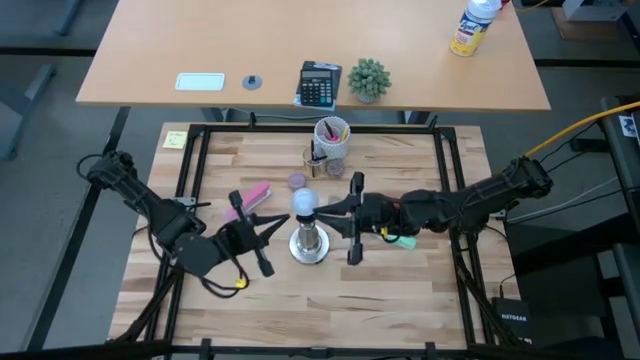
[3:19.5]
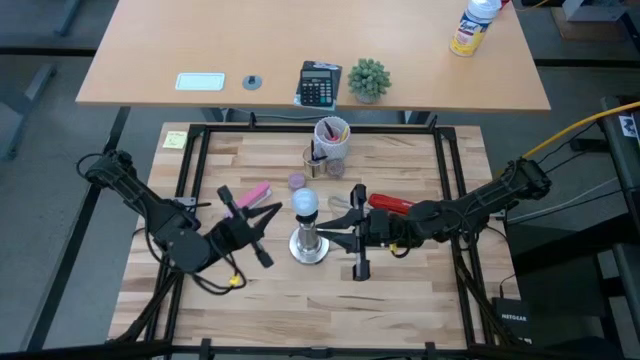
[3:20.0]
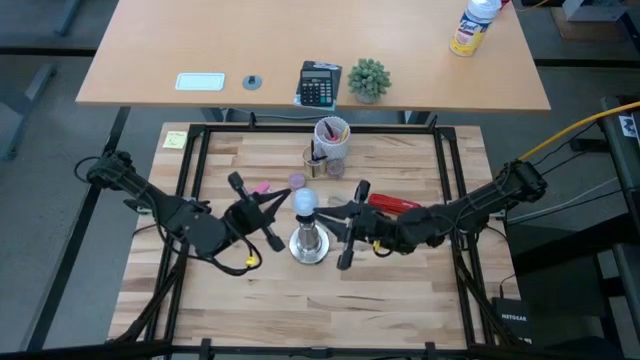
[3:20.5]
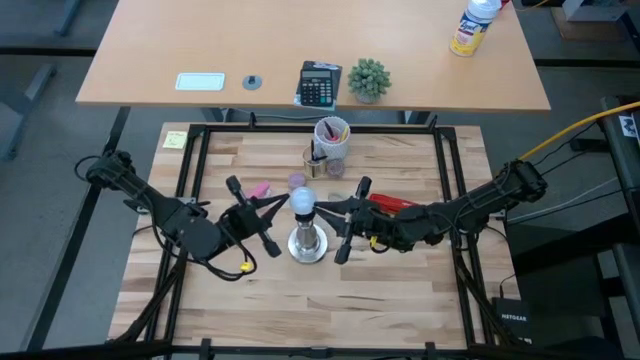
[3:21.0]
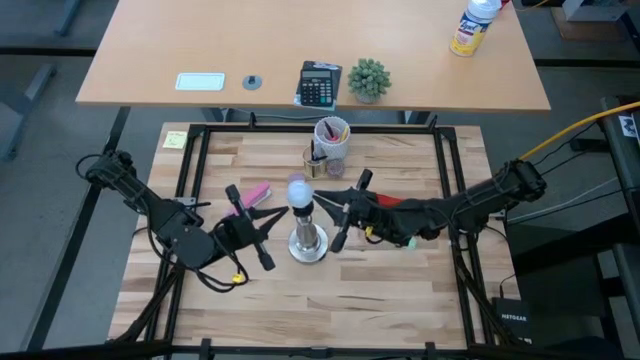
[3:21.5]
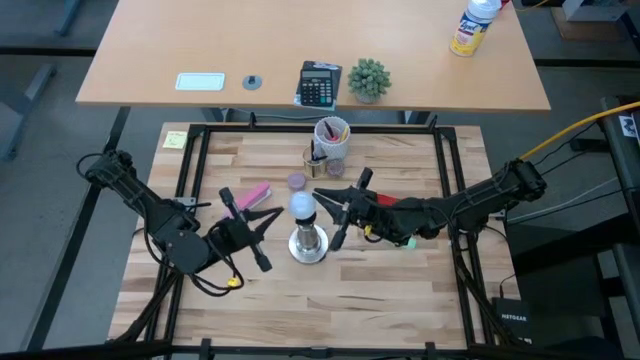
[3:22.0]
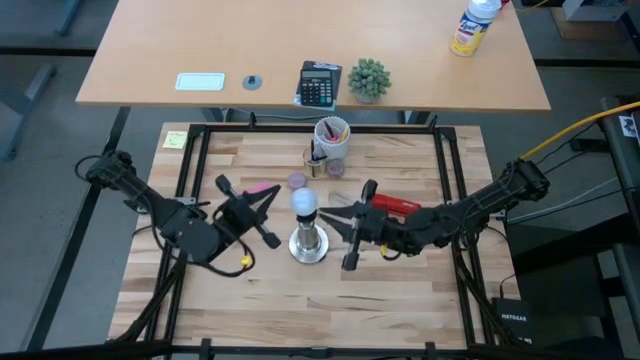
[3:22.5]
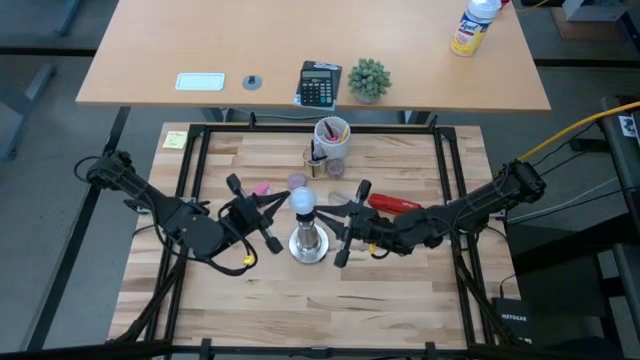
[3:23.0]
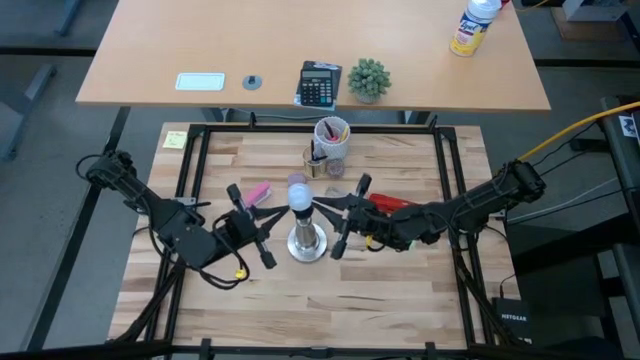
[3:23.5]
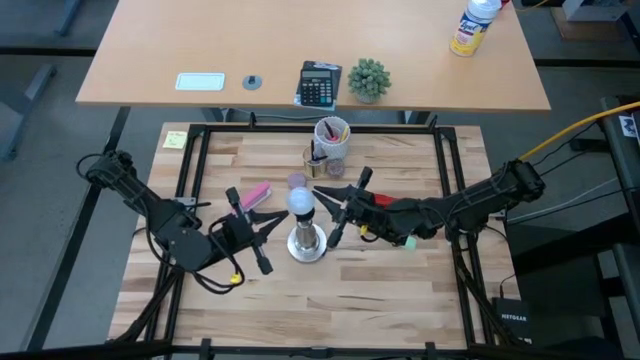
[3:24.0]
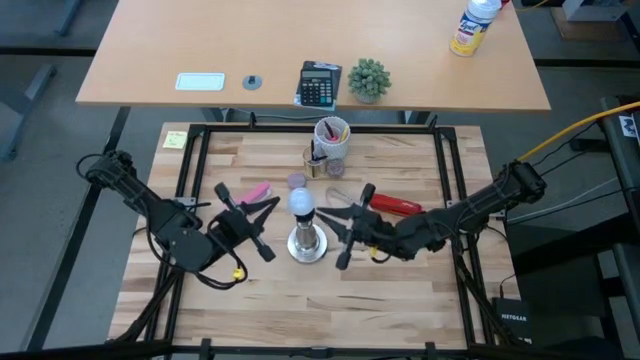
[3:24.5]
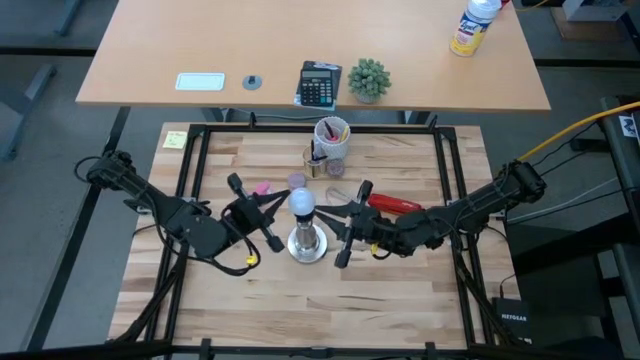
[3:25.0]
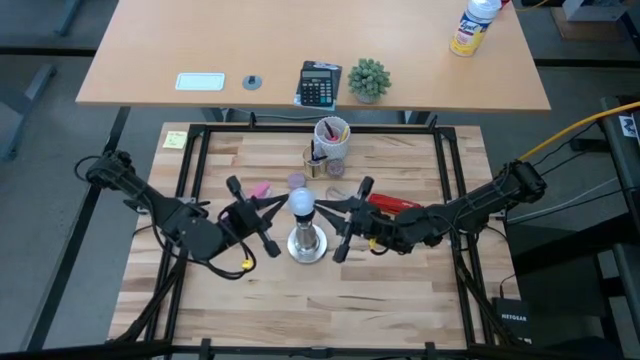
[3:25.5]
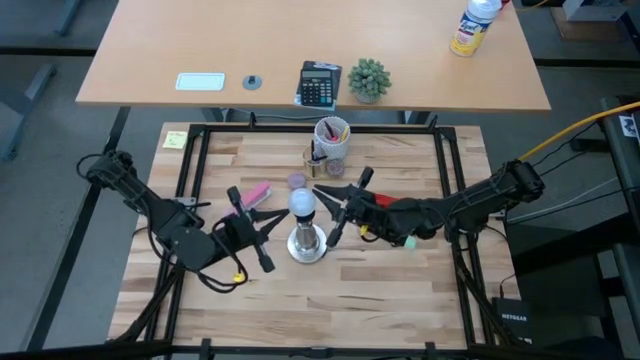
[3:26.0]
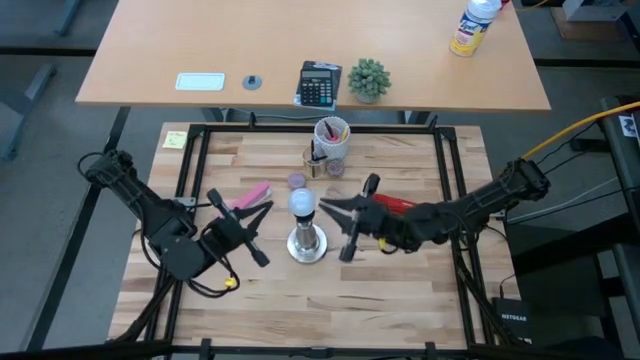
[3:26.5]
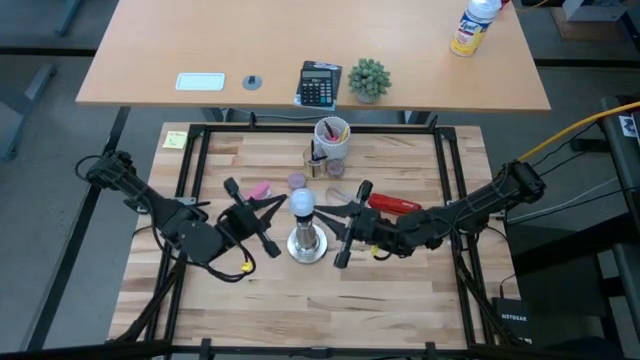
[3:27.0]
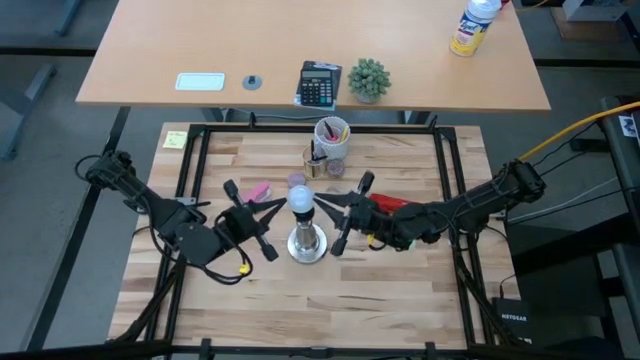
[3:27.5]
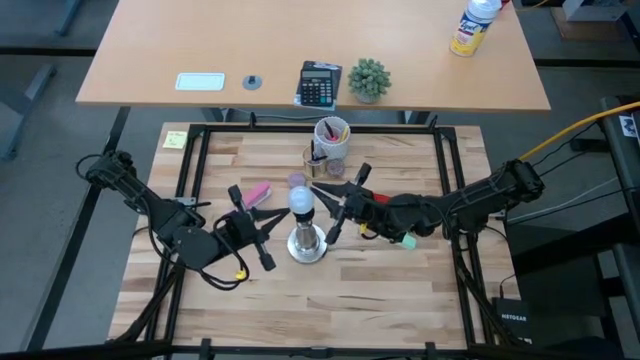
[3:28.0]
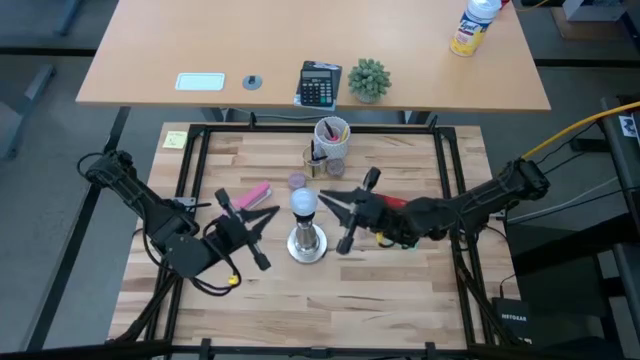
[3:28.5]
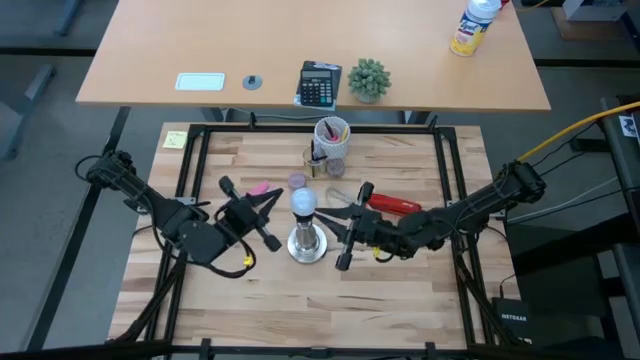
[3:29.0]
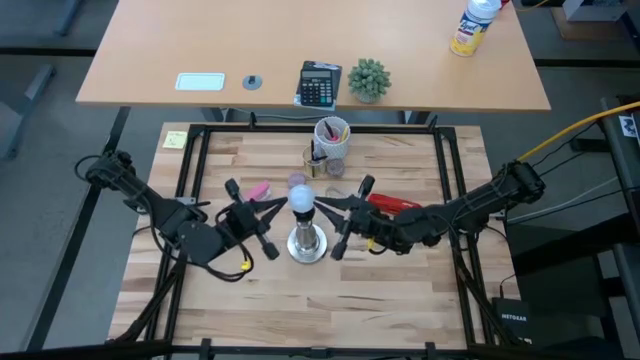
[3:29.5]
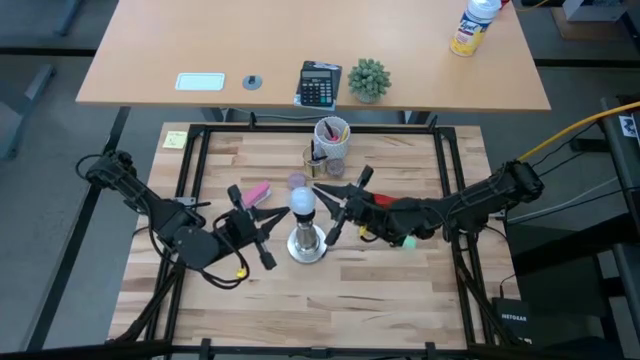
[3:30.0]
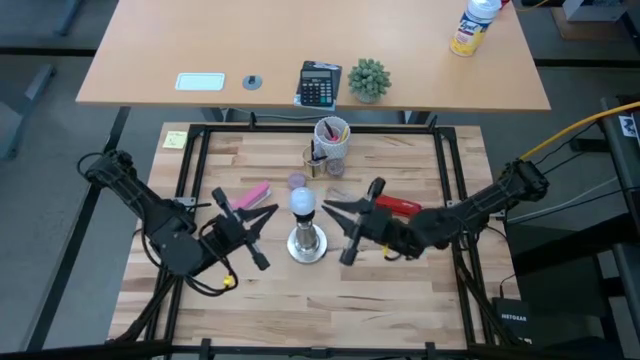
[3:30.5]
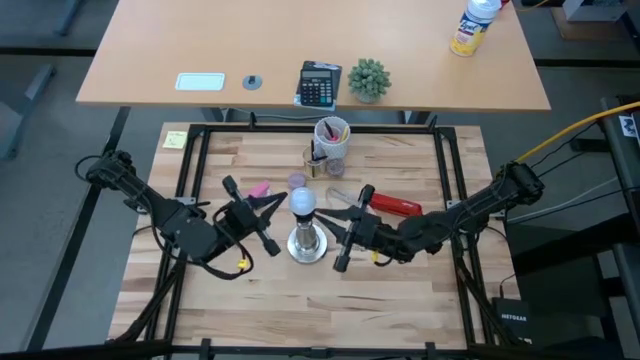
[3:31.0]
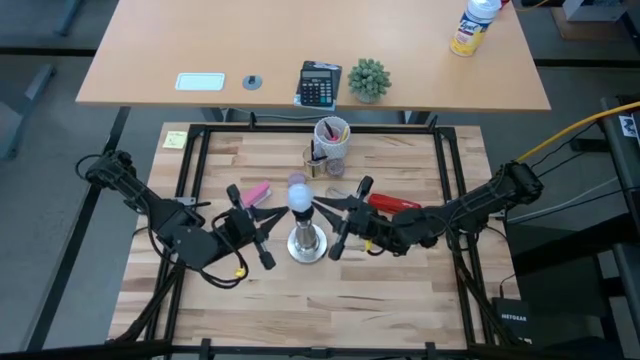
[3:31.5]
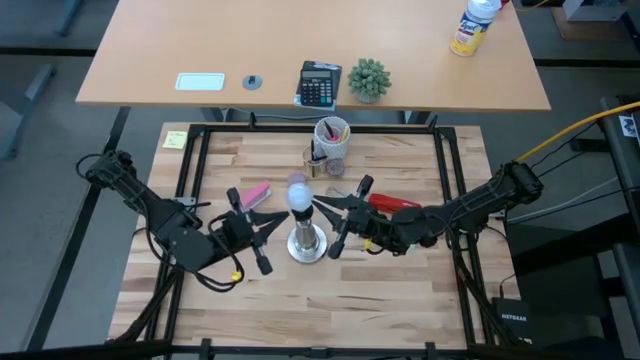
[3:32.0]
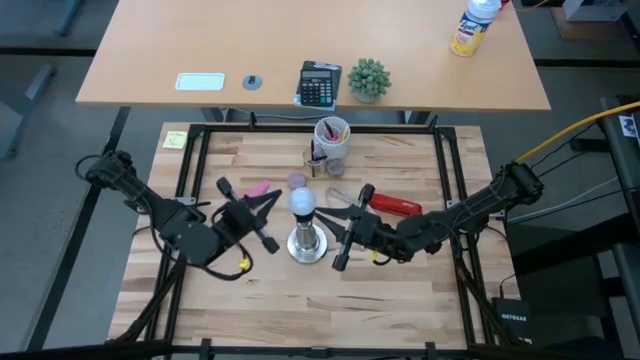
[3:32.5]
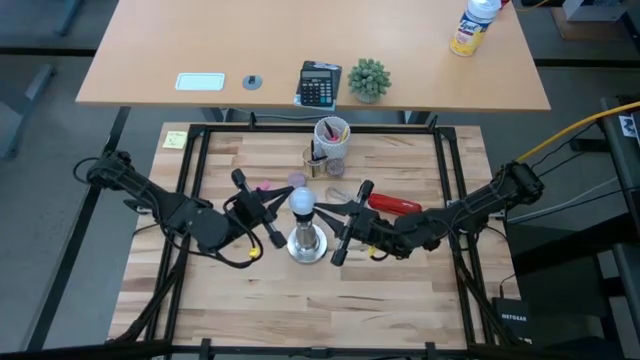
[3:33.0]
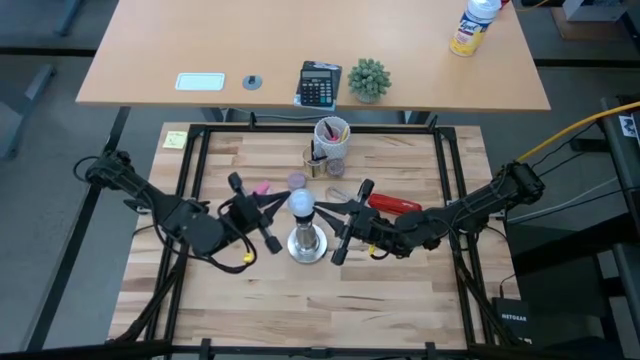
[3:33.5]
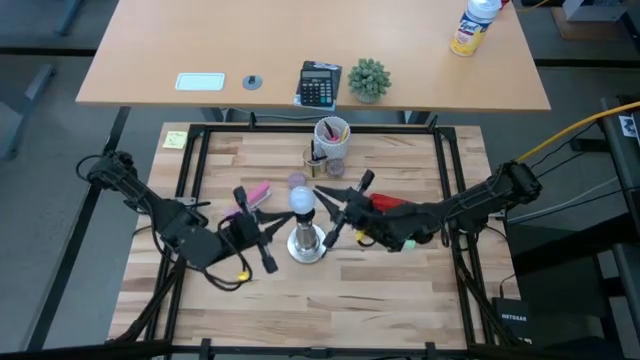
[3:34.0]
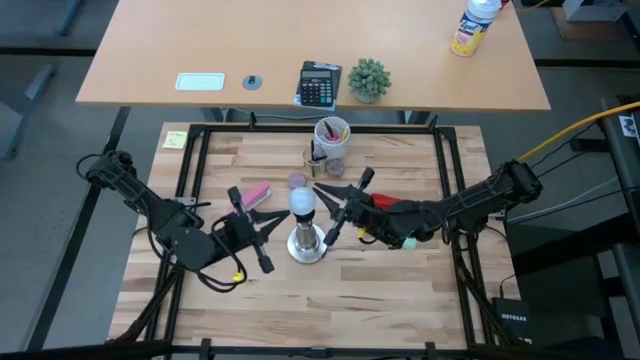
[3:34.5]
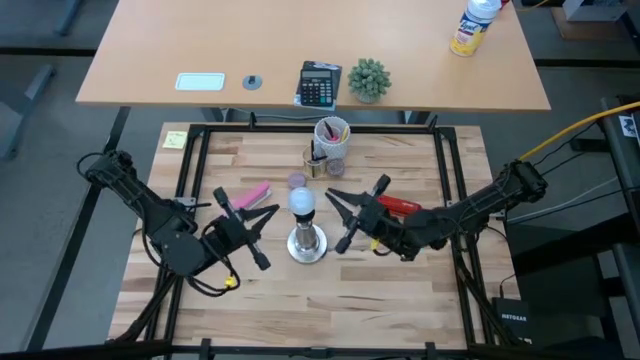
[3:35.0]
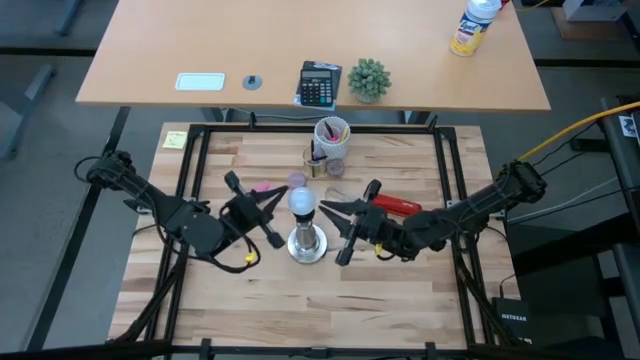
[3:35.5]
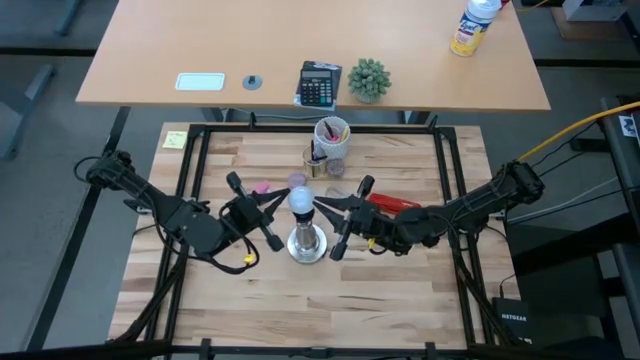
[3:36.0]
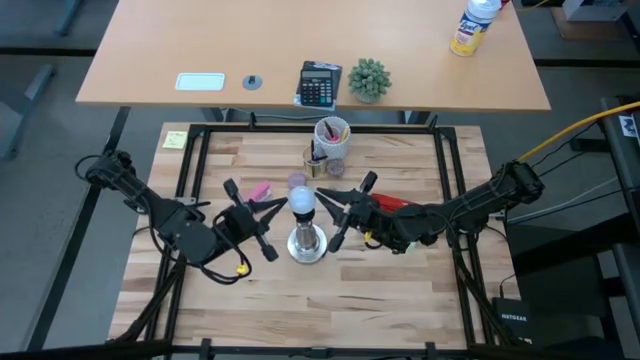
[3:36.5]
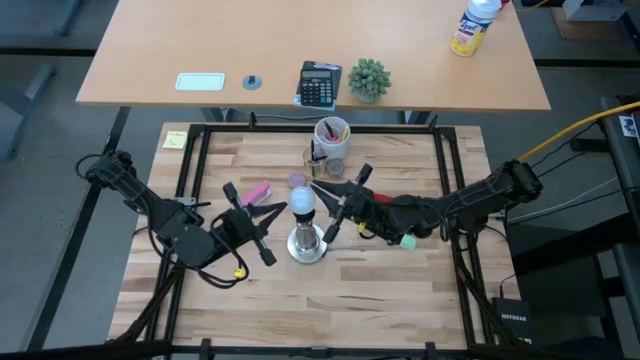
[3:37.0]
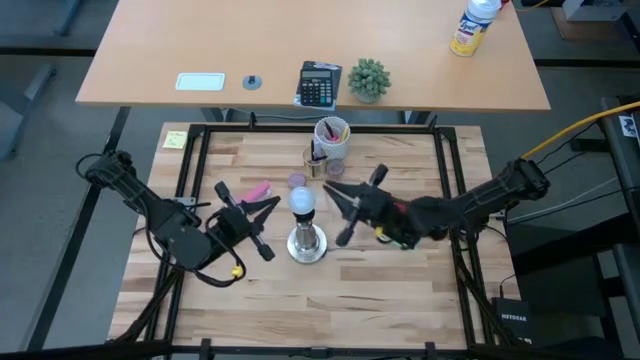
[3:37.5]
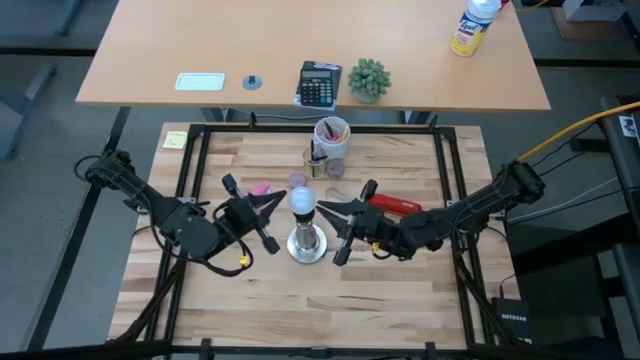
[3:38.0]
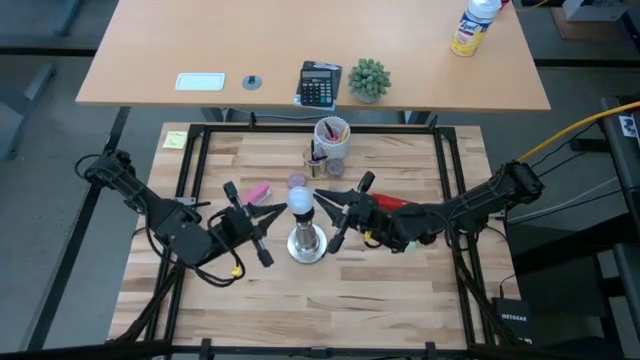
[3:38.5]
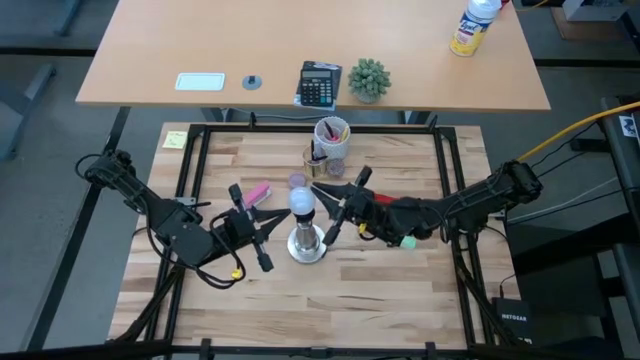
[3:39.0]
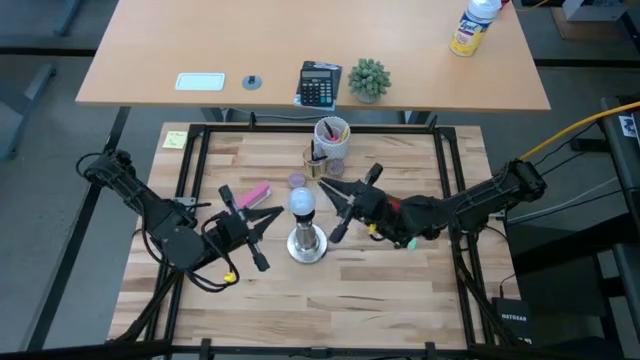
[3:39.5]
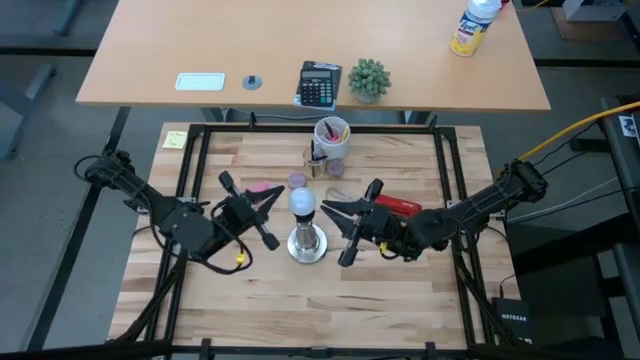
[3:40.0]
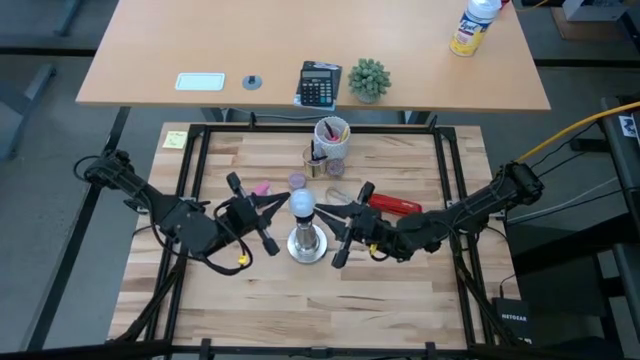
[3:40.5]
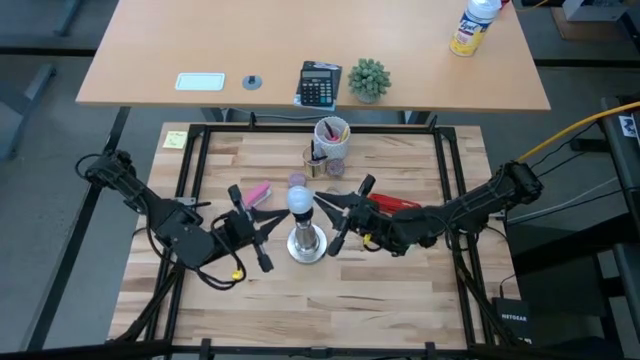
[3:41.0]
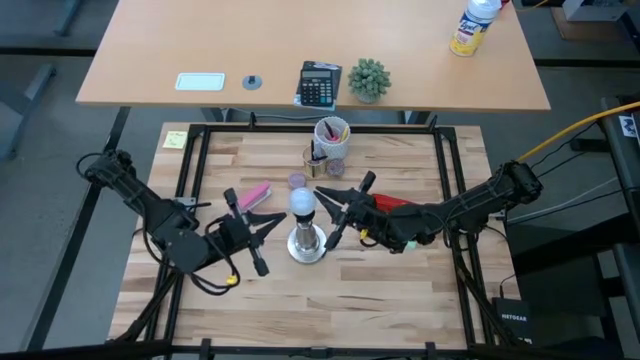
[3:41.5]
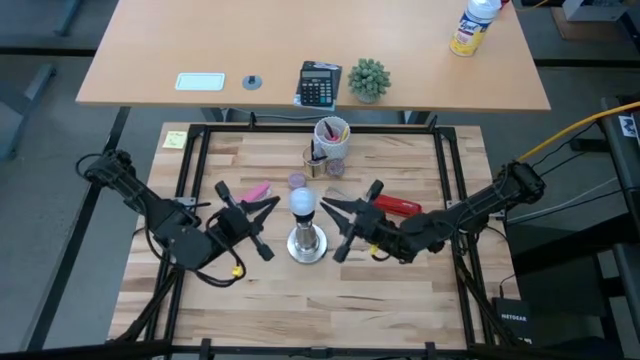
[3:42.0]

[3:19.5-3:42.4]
Task: Screw lightbulb
Remove the lightbulb from the lamp socket
